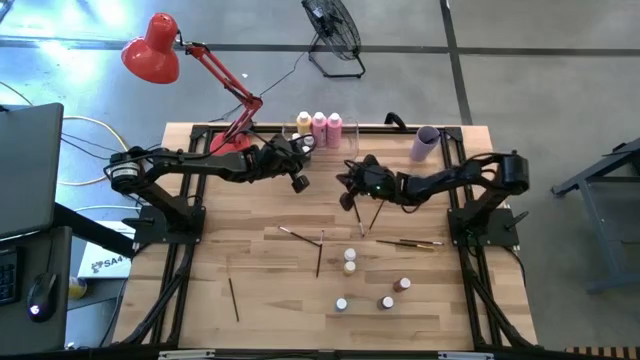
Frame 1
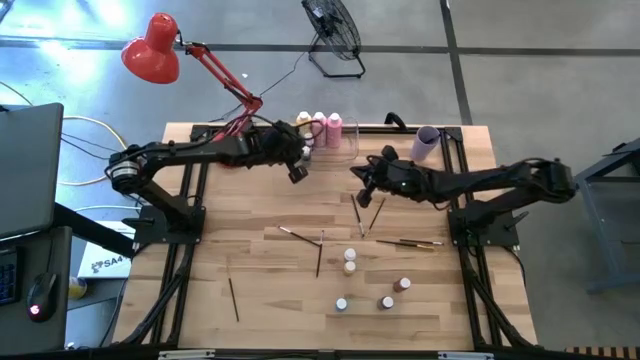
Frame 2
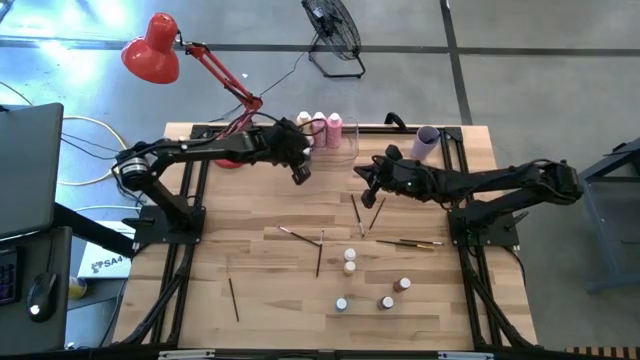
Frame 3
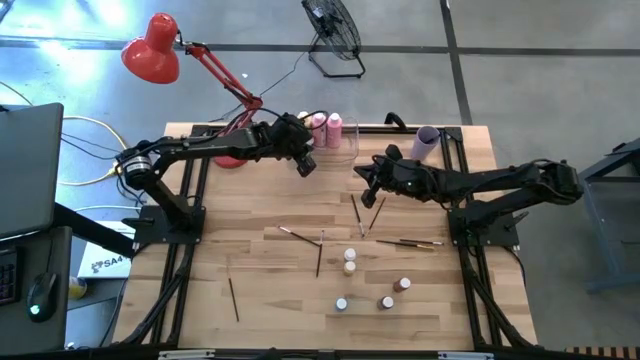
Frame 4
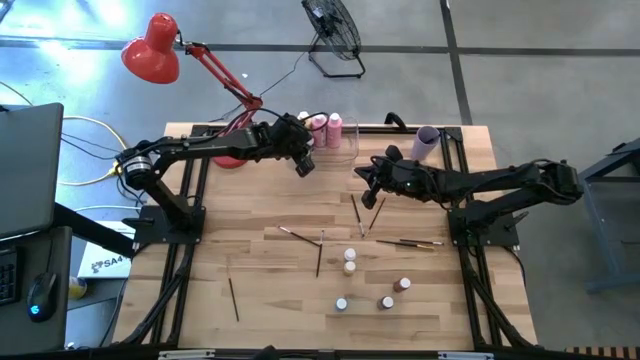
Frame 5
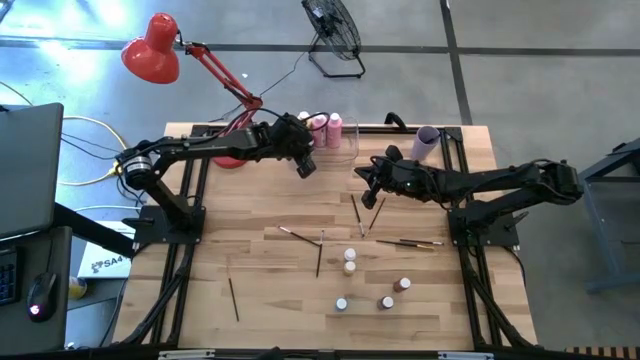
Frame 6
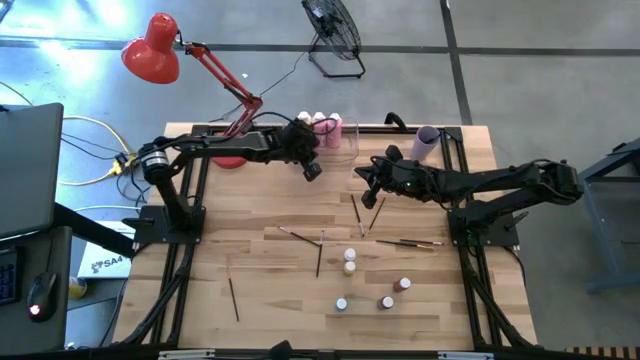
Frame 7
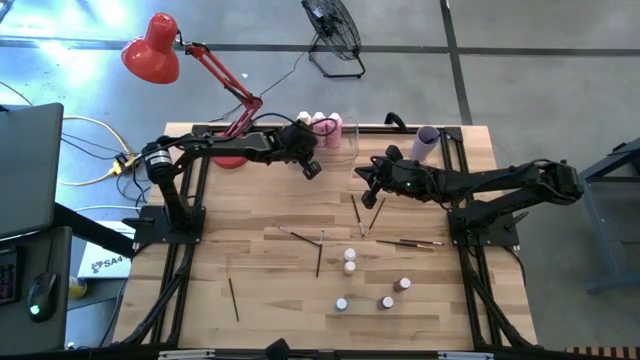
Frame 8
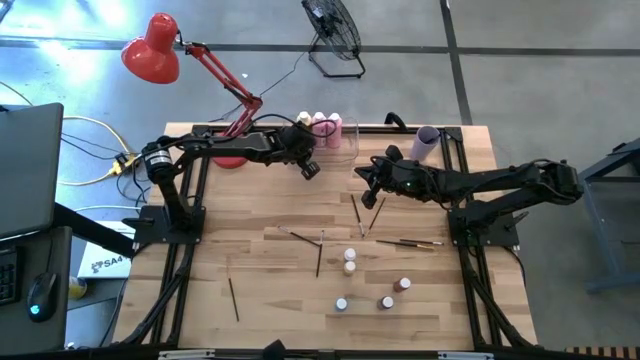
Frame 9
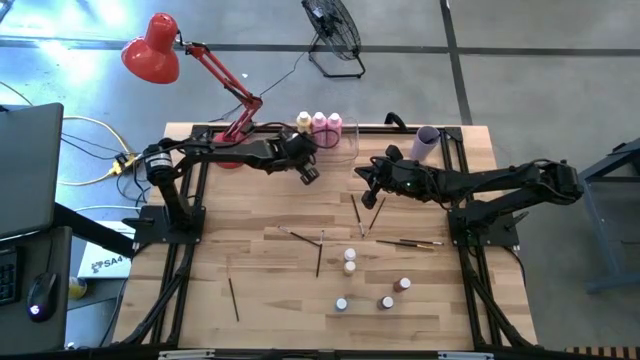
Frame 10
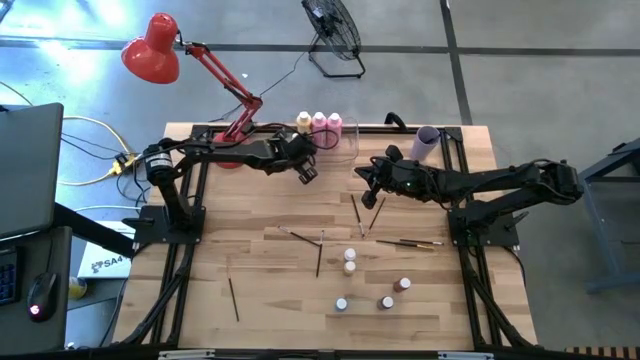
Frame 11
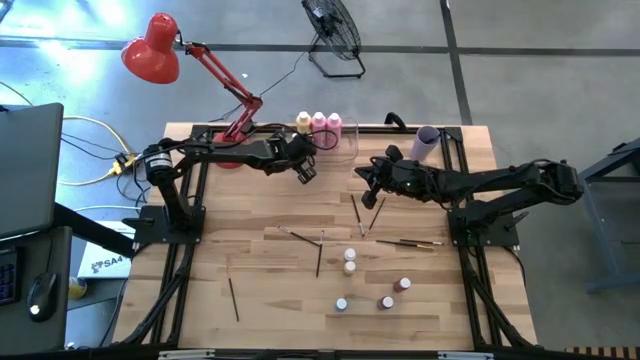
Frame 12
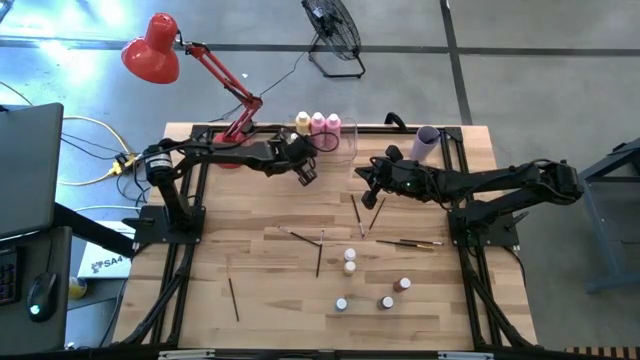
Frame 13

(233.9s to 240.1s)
Task: Pick & Place Paint Supplies
Adjust the small green paint bottle in the transparent bin

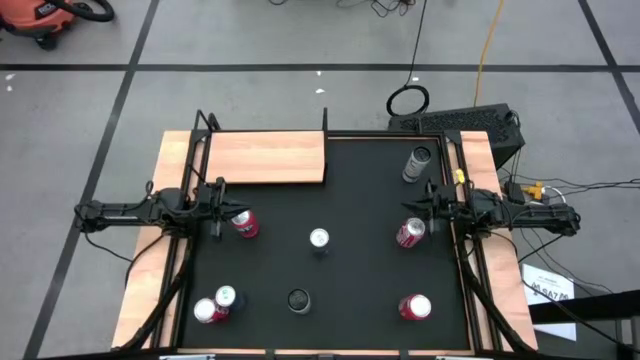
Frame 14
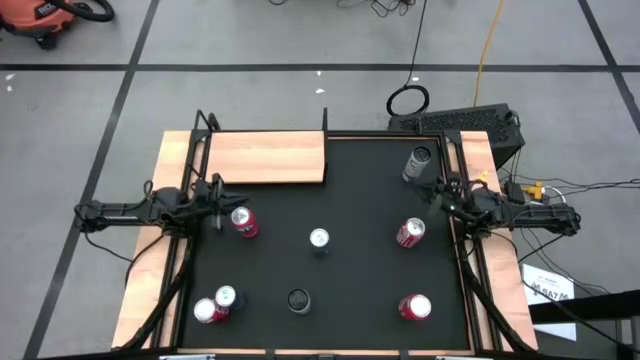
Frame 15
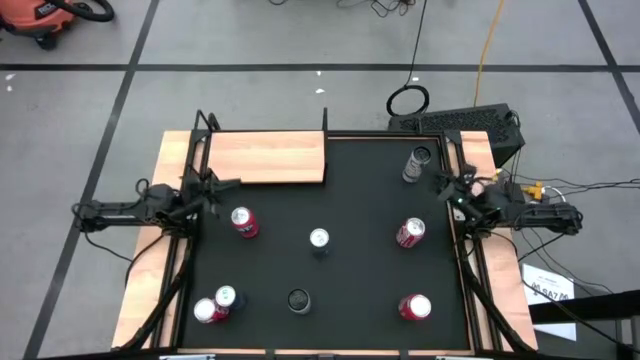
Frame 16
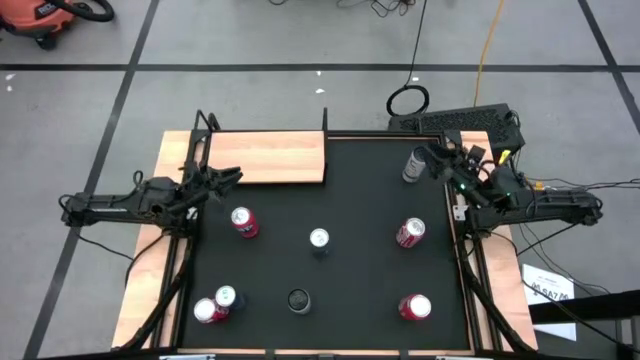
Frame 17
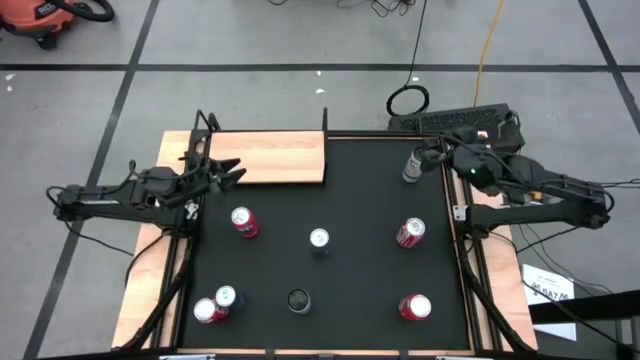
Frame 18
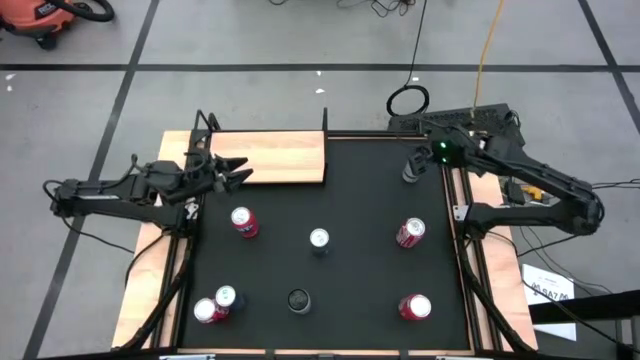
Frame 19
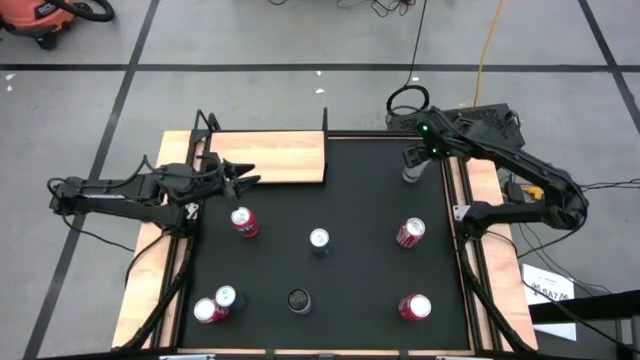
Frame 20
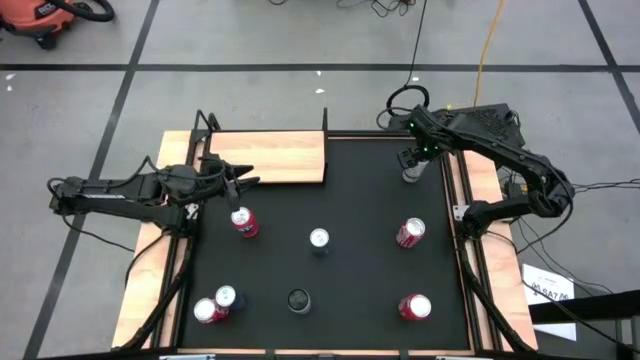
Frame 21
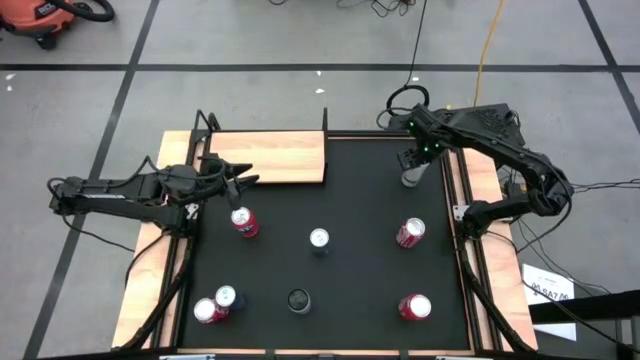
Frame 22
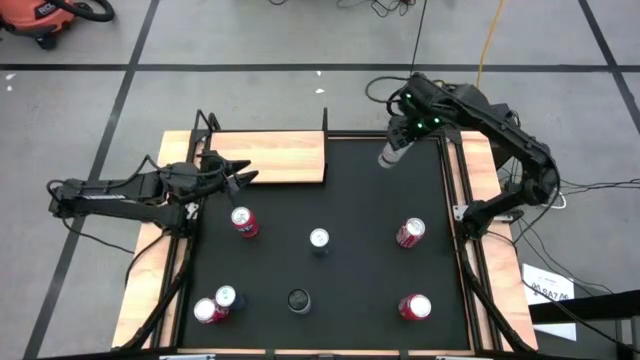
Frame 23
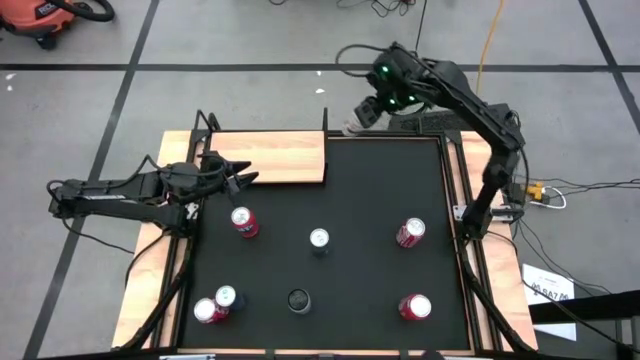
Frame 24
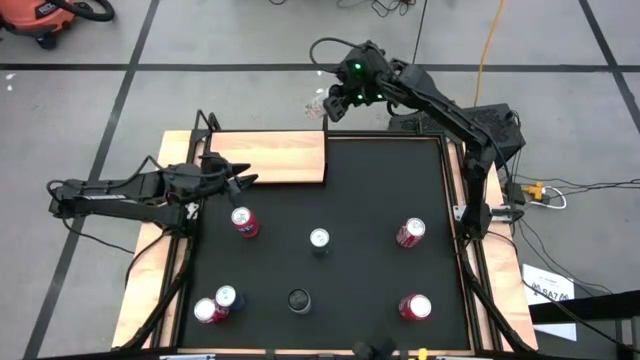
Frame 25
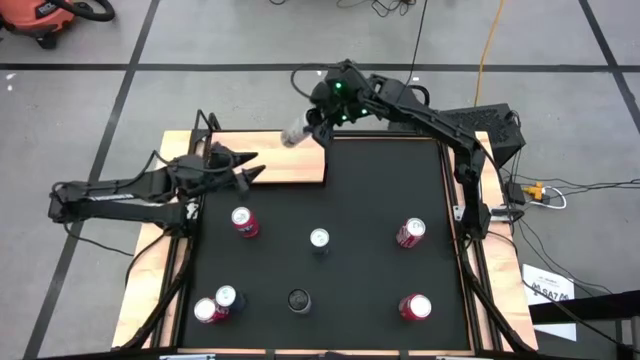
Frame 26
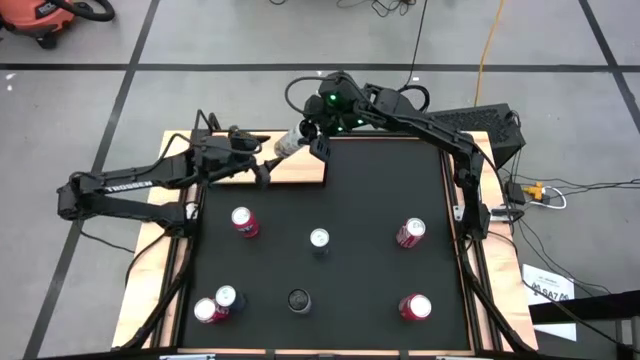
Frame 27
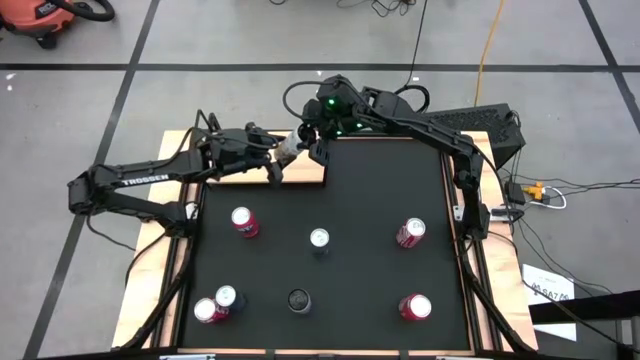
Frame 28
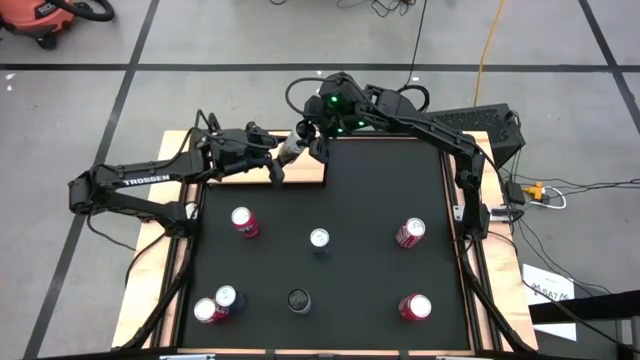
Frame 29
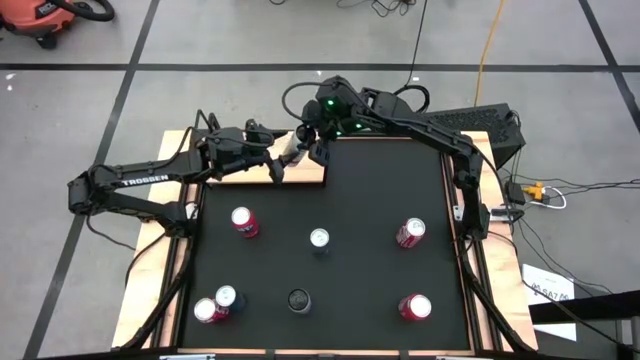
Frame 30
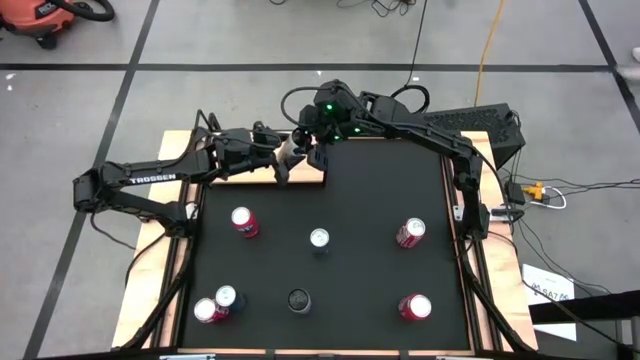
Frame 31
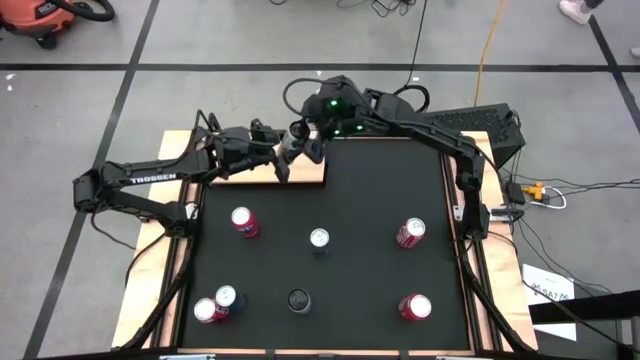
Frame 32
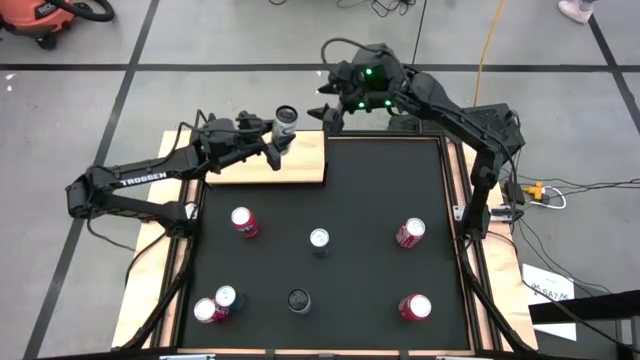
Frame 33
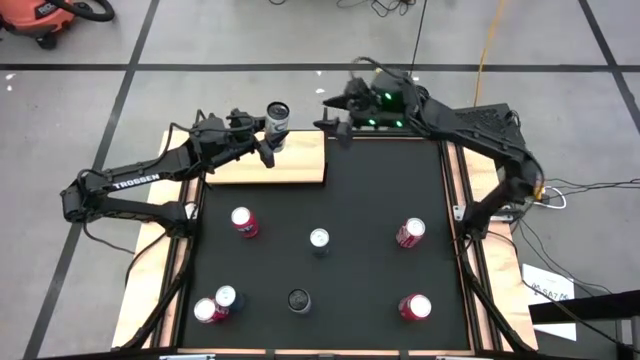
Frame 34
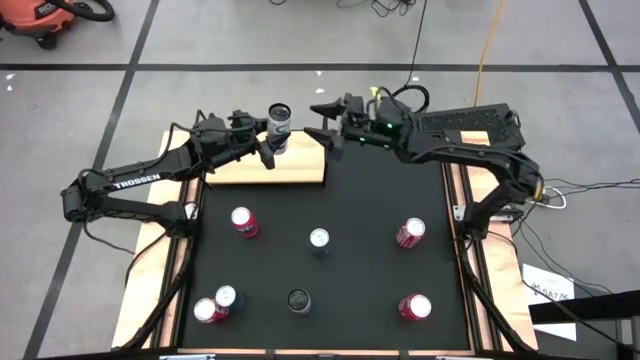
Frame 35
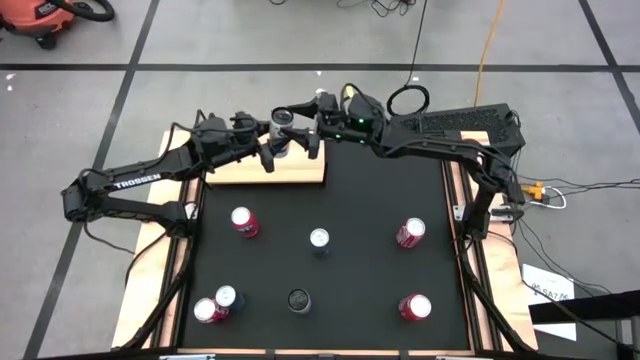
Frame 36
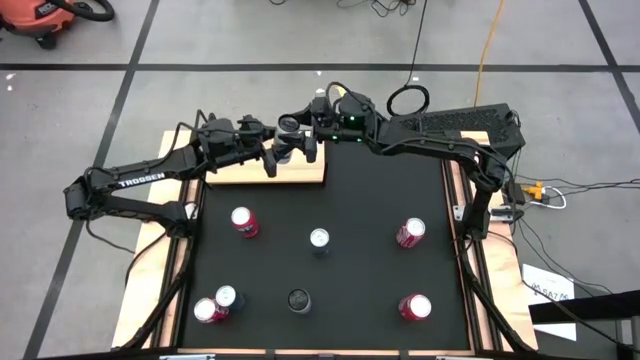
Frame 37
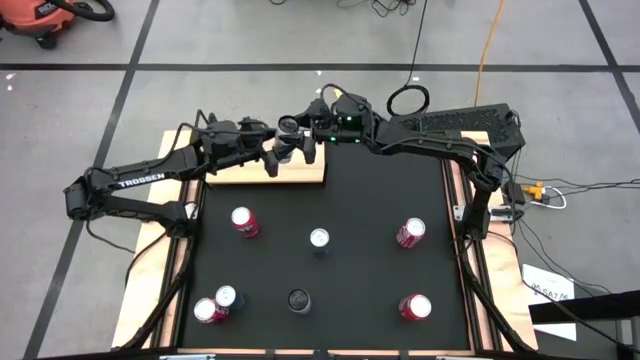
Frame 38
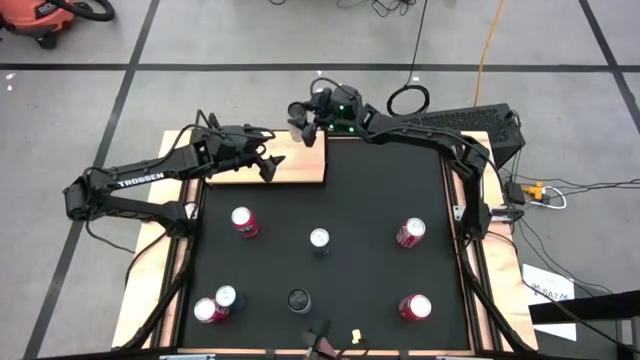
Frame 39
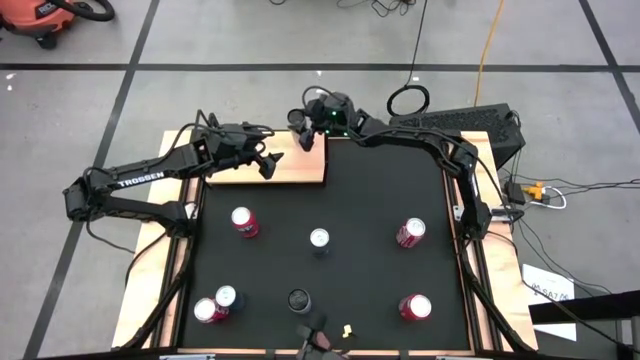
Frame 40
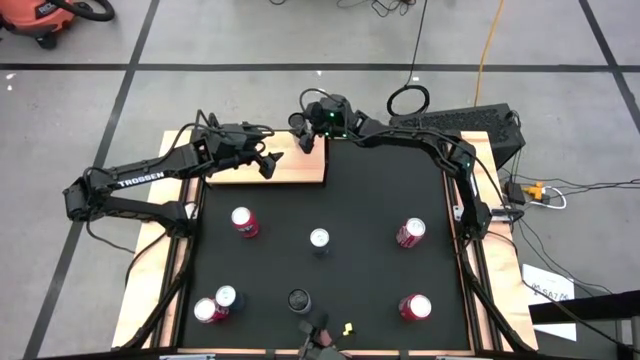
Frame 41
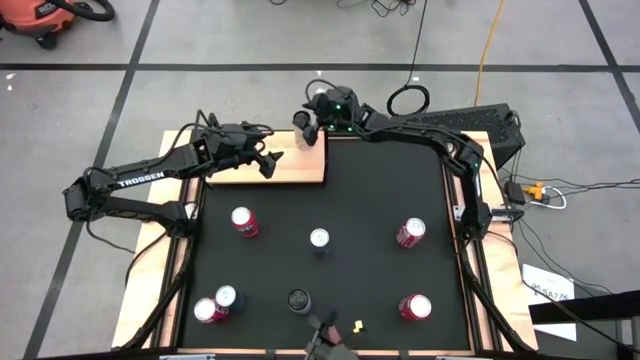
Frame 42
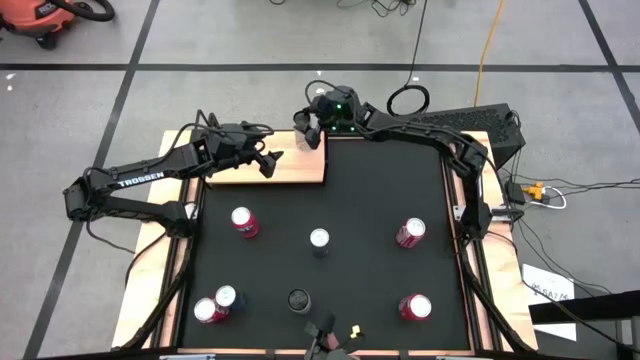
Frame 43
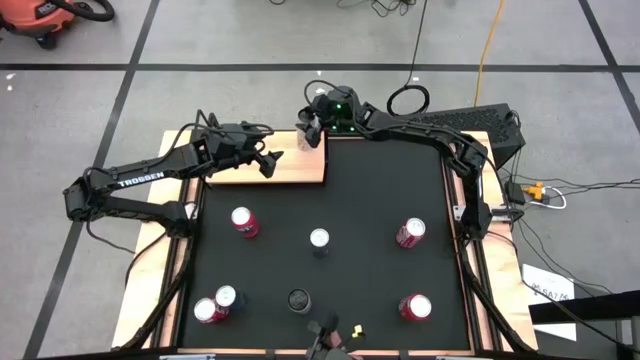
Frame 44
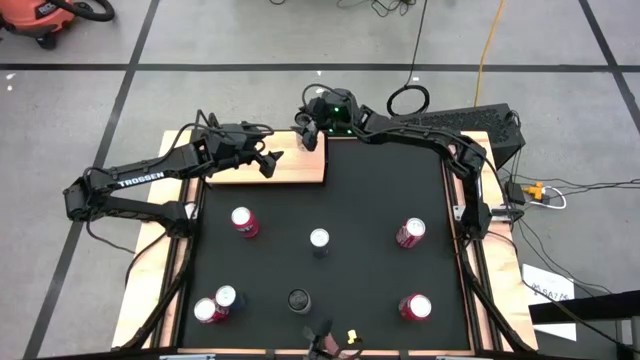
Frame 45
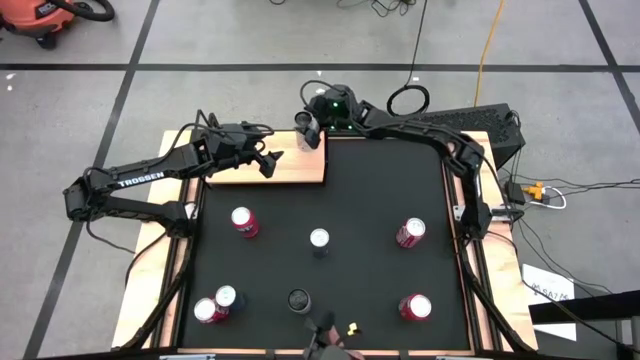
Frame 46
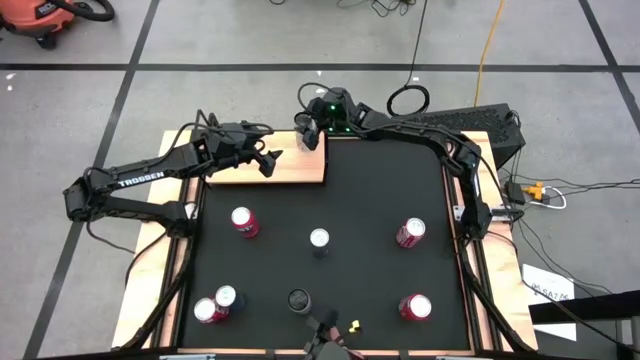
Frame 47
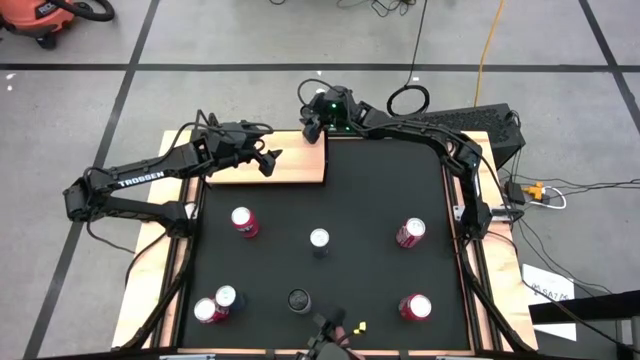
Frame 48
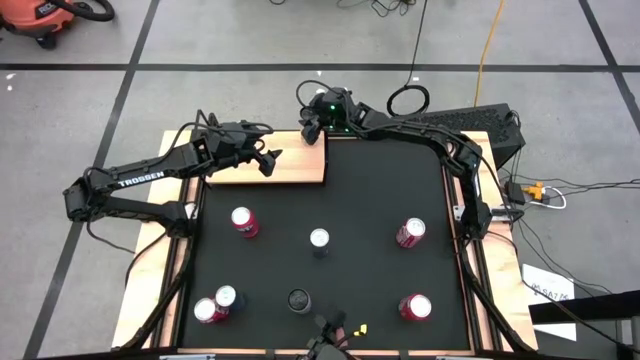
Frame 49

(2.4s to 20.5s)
Task: Place canned beverage on shelf
Put the top white-yellow soda can on the shelf
